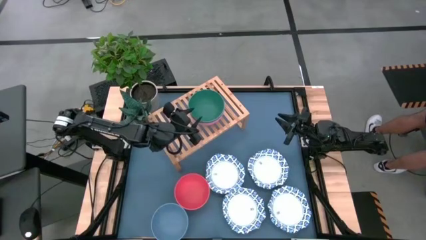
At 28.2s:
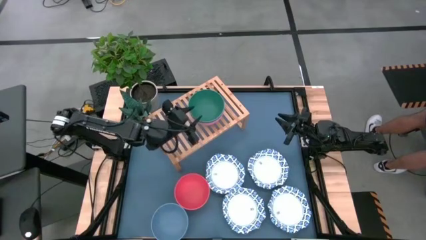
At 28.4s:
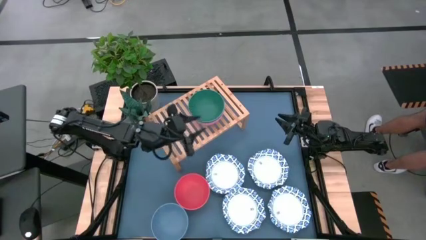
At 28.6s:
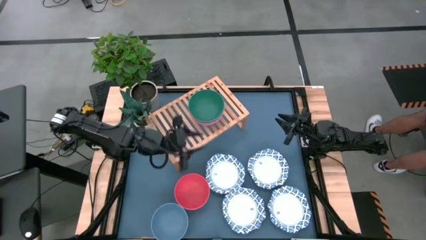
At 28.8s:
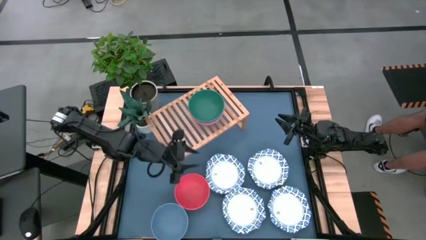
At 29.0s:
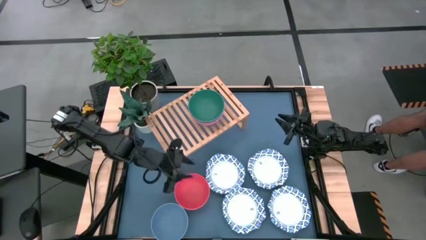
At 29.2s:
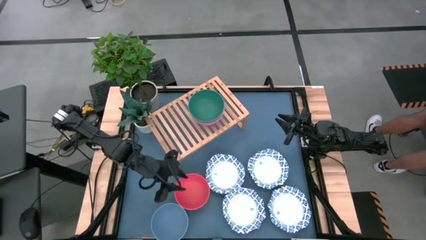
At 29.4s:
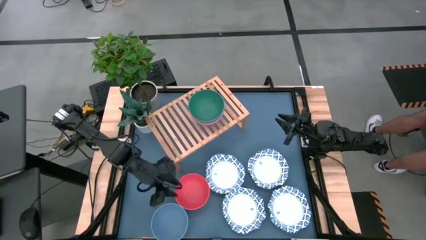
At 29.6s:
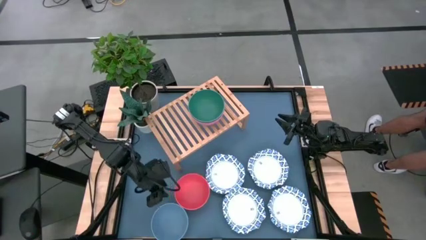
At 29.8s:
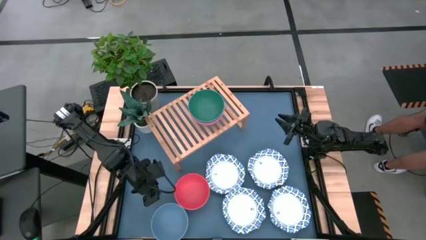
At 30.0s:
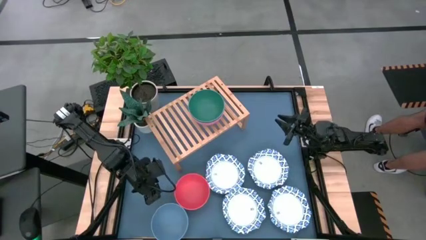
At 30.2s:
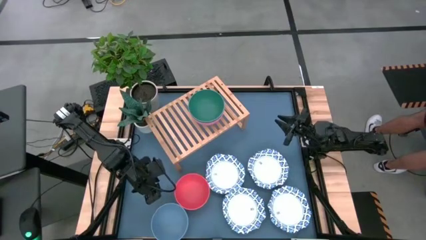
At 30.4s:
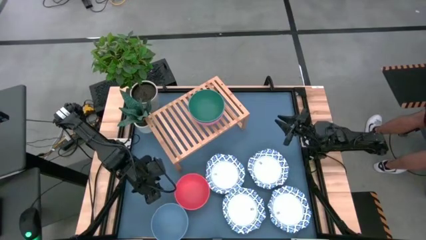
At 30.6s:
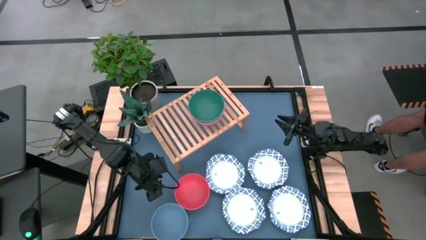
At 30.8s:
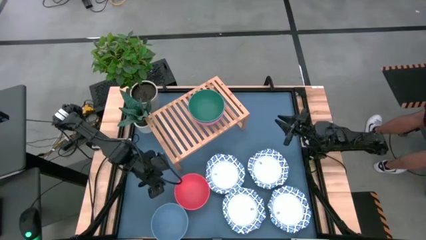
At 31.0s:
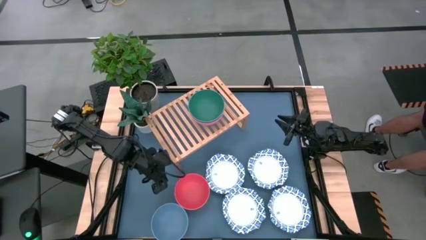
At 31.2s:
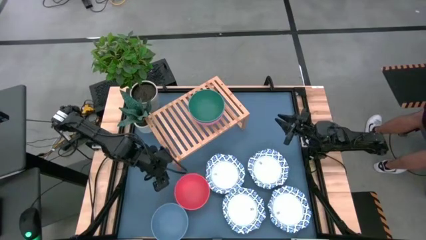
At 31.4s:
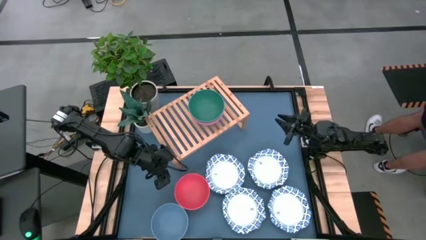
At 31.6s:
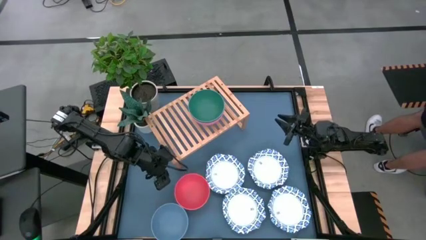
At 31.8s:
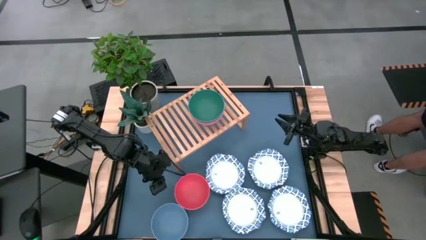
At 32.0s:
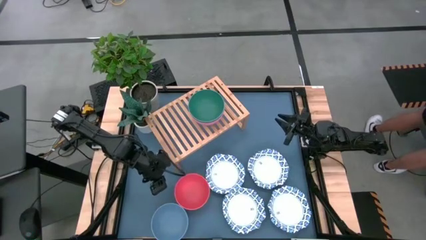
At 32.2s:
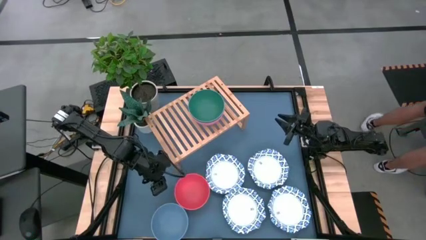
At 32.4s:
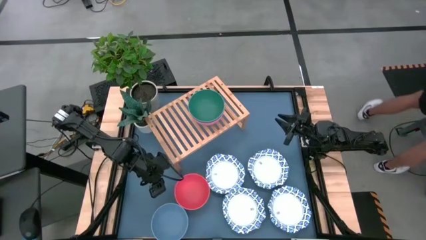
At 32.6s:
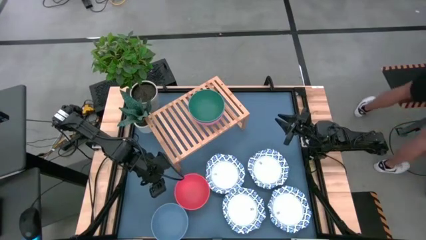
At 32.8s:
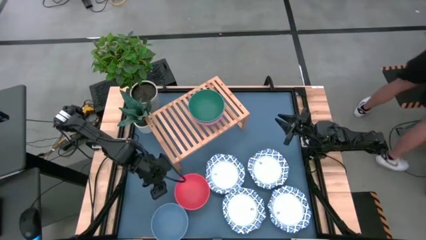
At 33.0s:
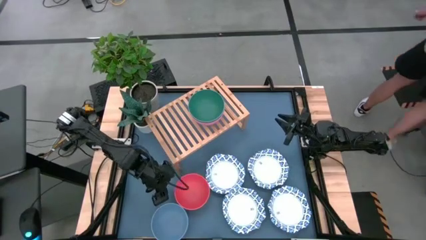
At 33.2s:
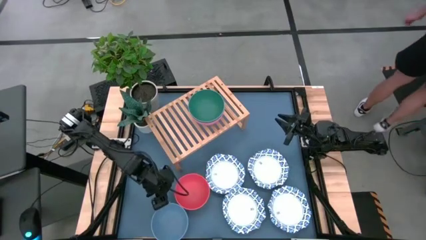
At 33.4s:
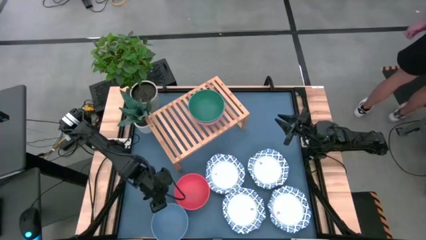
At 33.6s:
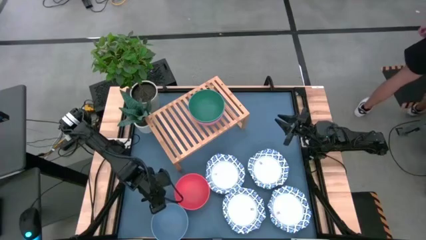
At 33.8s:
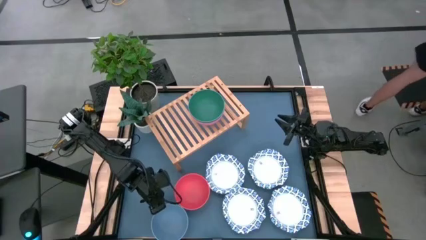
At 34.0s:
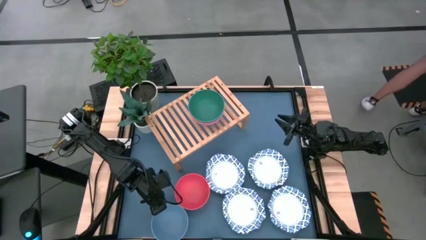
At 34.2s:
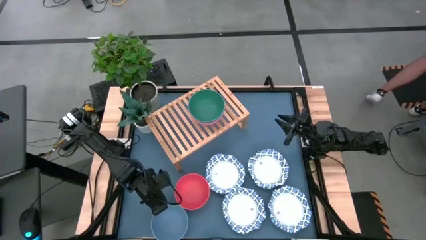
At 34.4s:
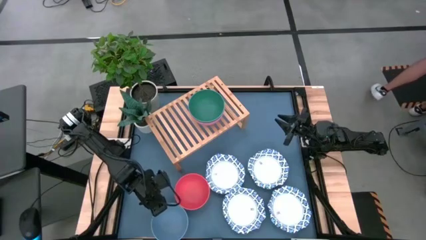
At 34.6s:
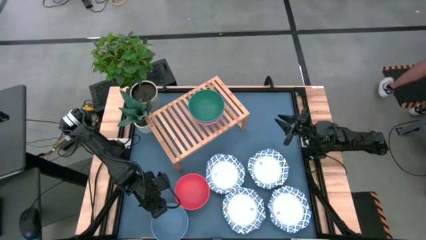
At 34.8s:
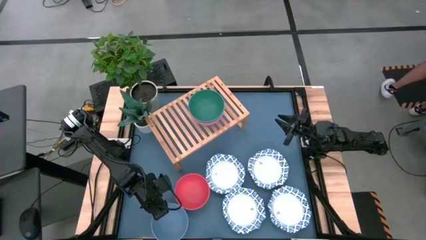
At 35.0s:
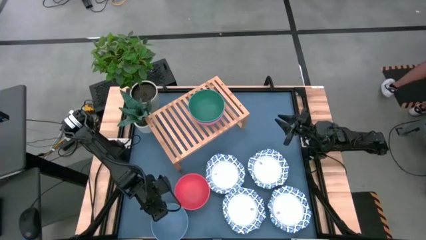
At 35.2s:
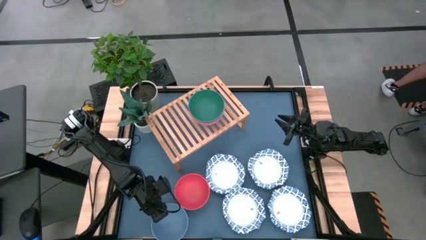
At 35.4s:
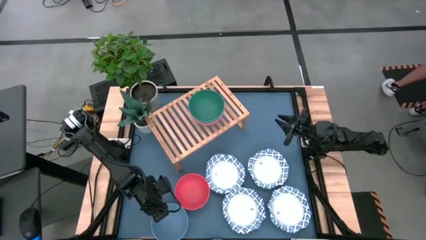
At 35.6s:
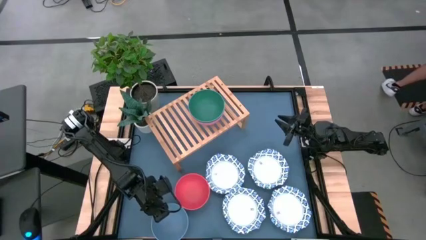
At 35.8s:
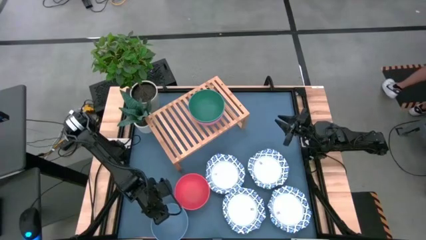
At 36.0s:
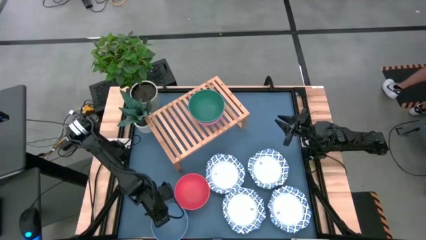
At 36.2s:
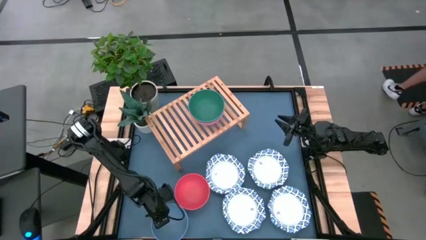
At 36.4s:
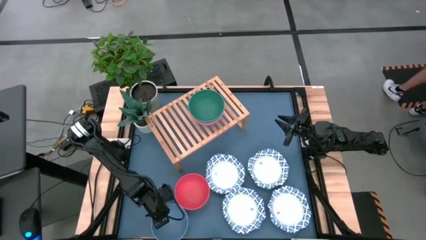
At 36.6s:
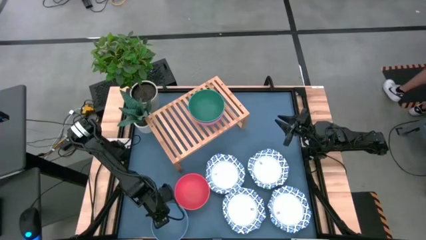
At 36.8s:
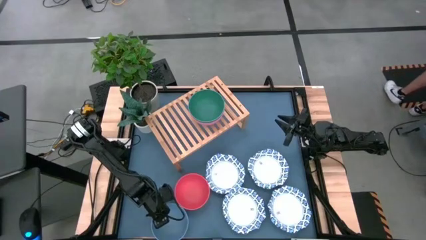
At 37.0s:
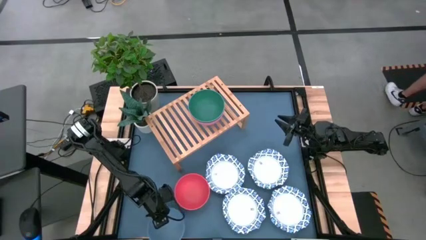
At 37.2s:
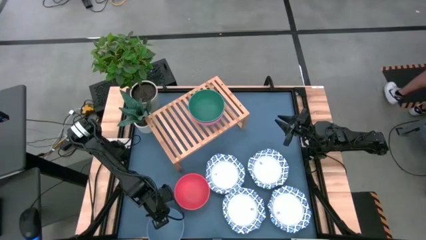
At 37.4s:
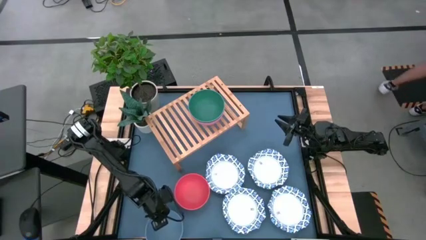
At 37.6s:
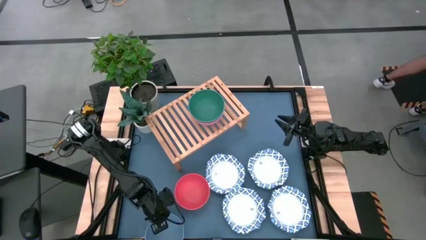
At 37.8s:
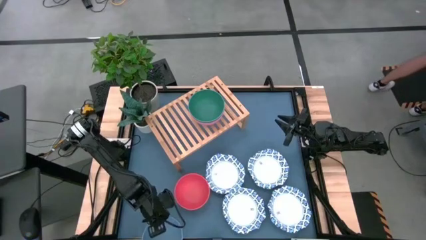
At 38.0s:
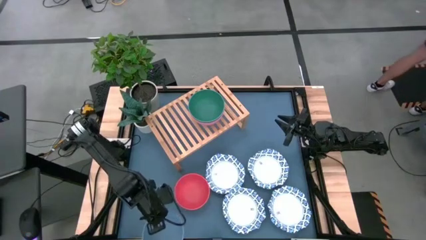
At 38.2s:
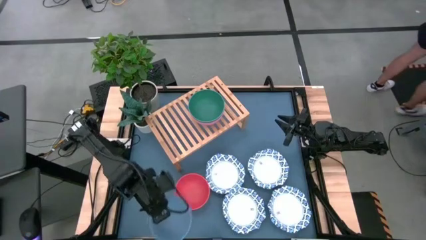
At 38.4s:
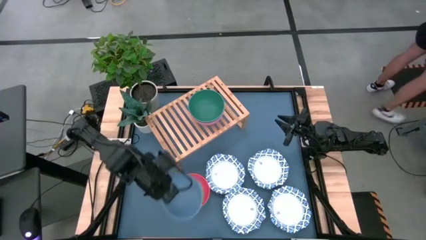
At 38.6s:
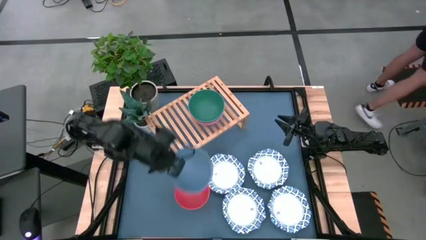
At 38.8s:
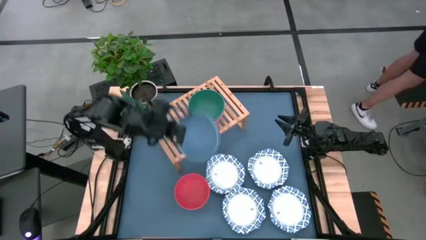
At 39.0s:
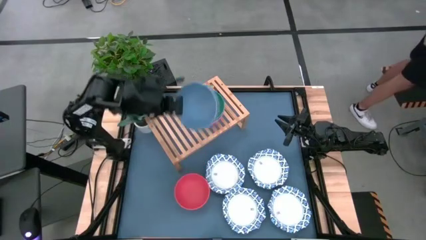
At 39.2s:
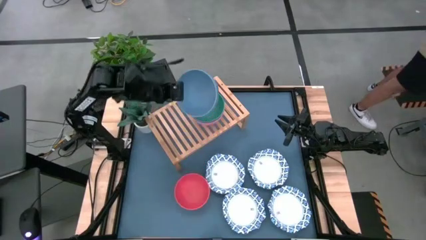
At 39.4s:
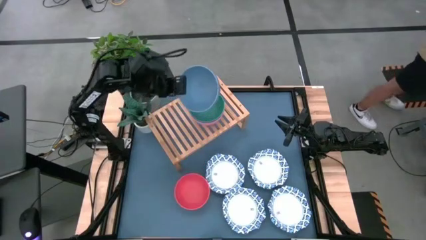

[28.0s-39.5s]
Task: Place and stack bowls onto a shelf
Stack the blue bowl on top of the green bowl on the shelf
